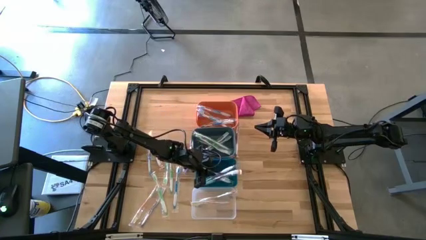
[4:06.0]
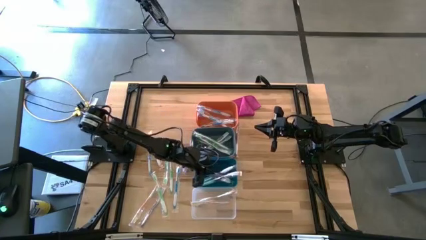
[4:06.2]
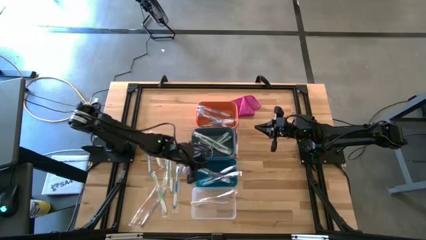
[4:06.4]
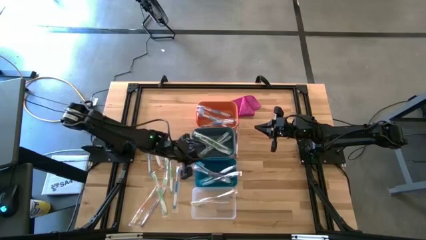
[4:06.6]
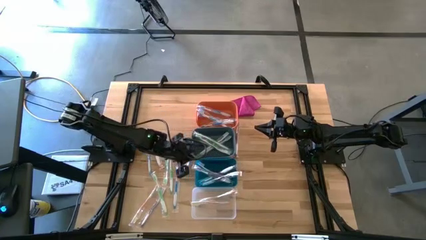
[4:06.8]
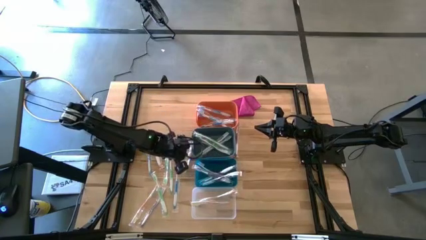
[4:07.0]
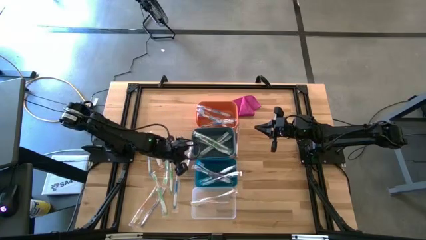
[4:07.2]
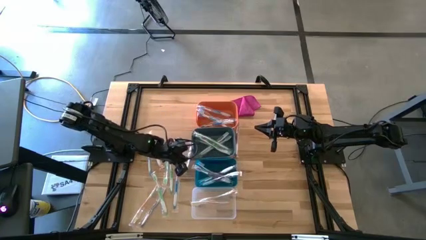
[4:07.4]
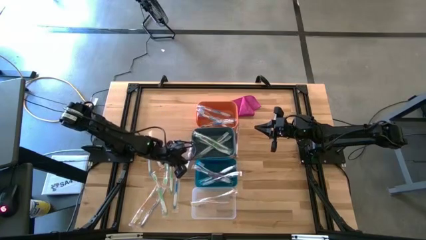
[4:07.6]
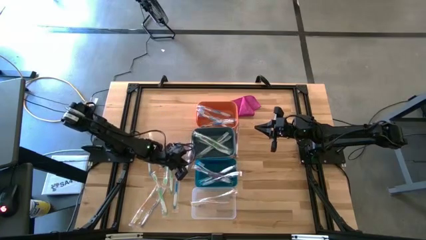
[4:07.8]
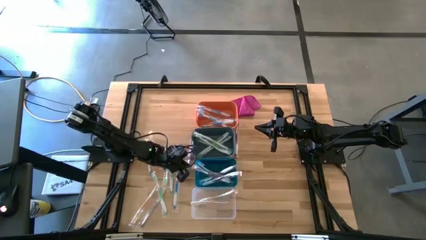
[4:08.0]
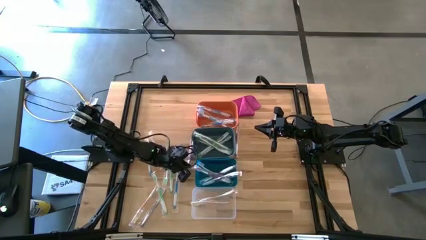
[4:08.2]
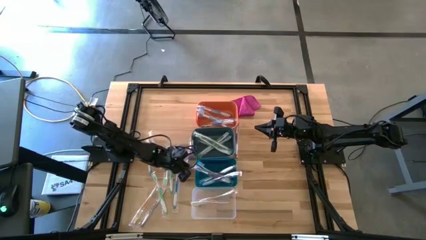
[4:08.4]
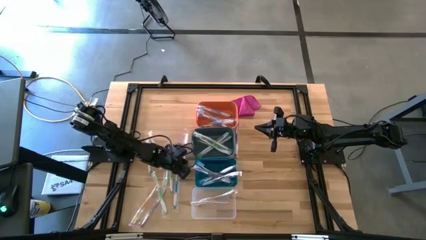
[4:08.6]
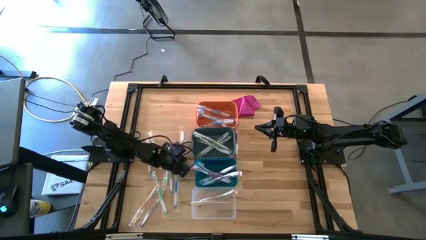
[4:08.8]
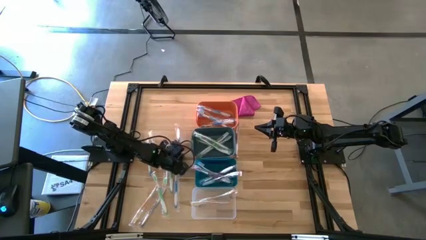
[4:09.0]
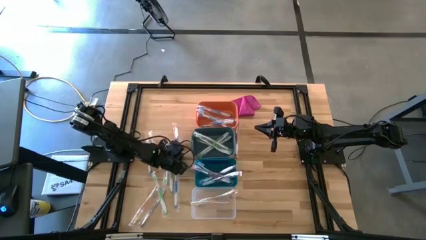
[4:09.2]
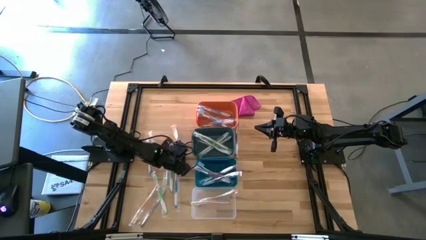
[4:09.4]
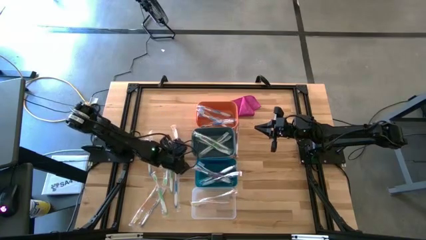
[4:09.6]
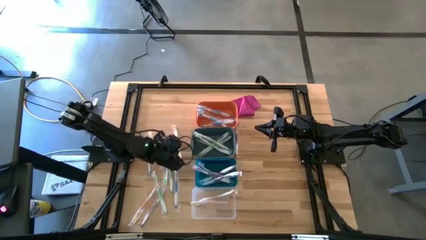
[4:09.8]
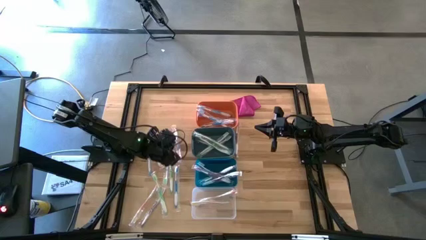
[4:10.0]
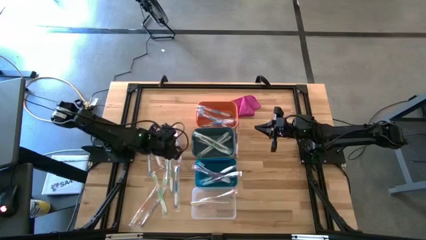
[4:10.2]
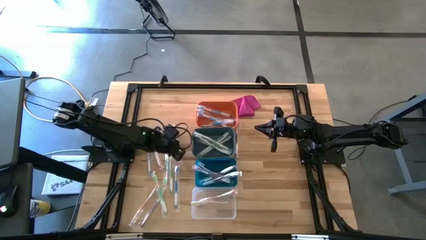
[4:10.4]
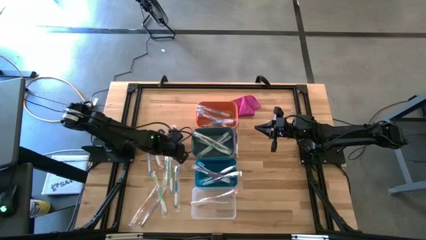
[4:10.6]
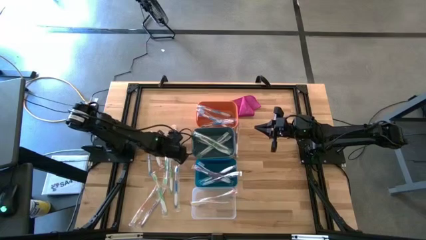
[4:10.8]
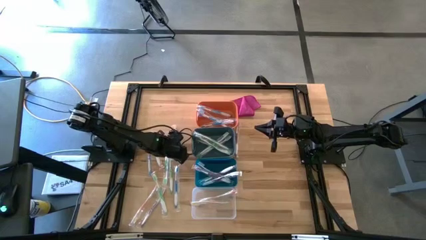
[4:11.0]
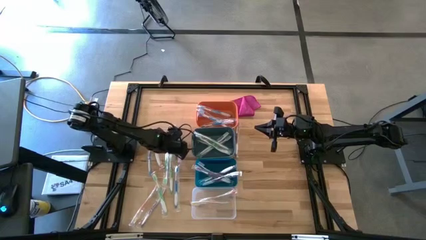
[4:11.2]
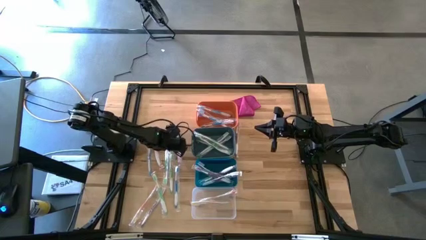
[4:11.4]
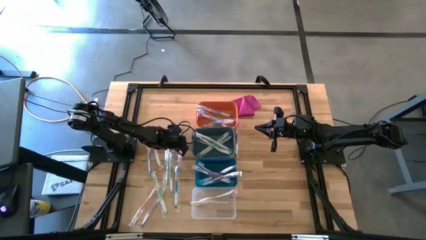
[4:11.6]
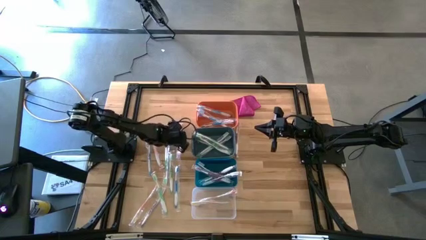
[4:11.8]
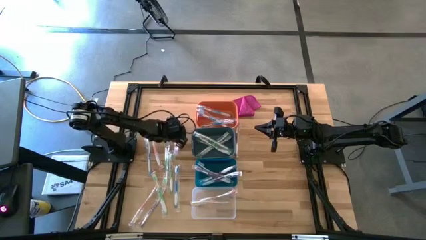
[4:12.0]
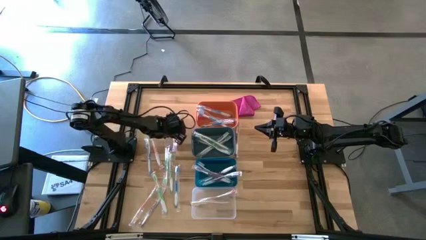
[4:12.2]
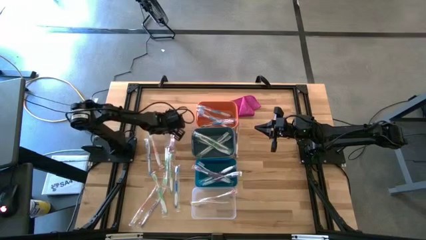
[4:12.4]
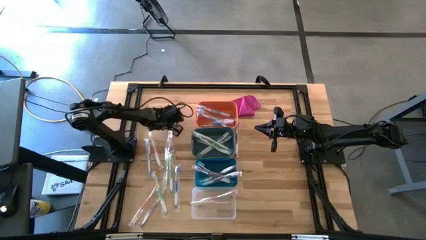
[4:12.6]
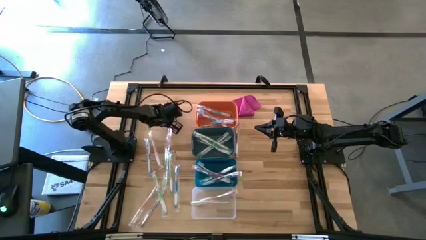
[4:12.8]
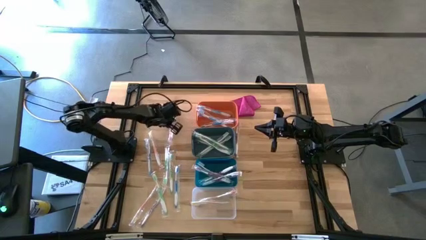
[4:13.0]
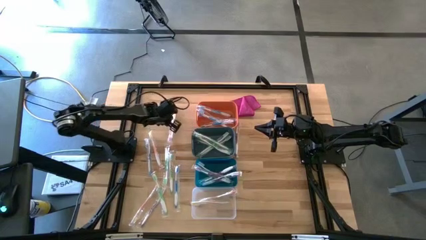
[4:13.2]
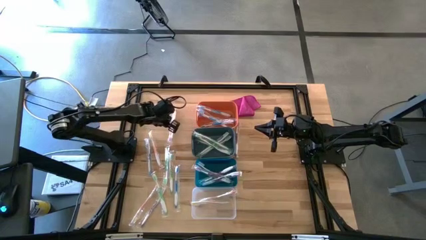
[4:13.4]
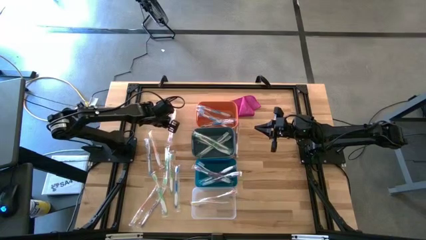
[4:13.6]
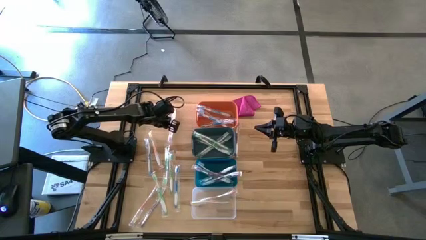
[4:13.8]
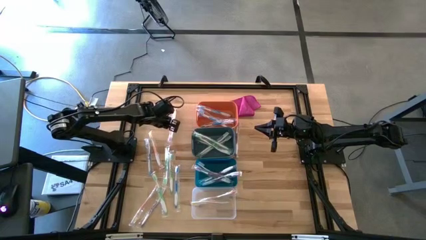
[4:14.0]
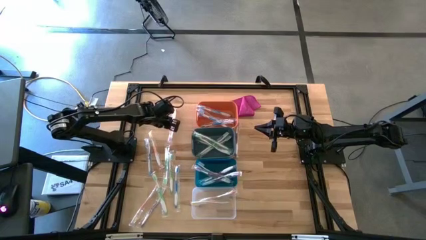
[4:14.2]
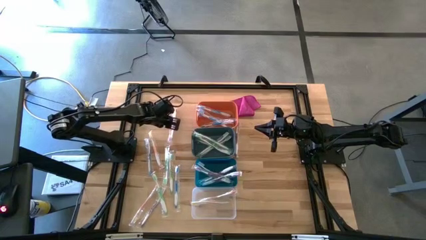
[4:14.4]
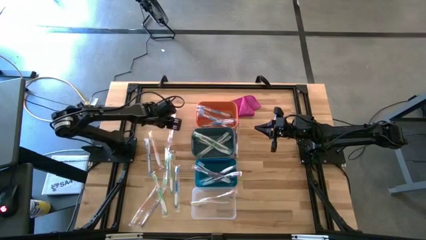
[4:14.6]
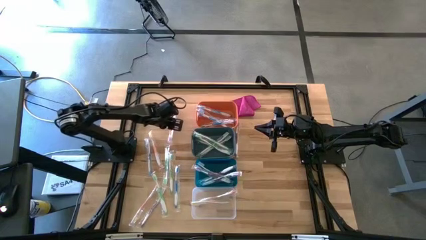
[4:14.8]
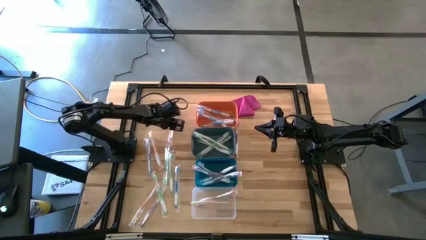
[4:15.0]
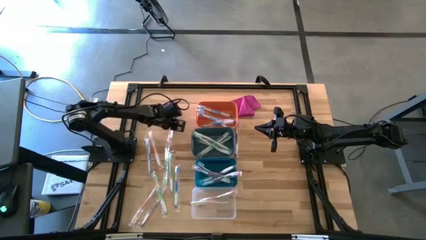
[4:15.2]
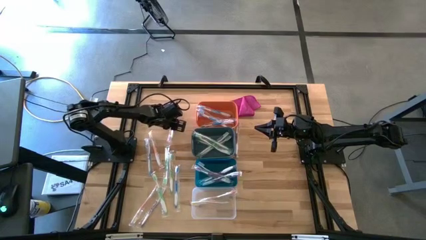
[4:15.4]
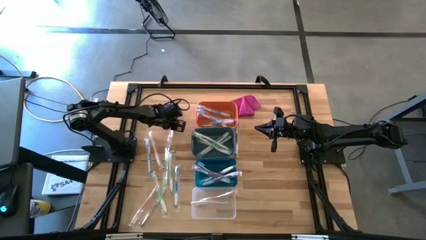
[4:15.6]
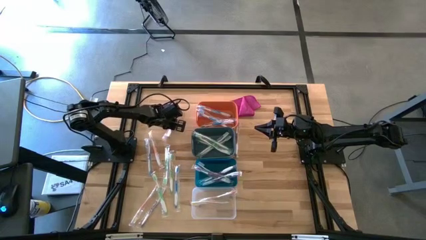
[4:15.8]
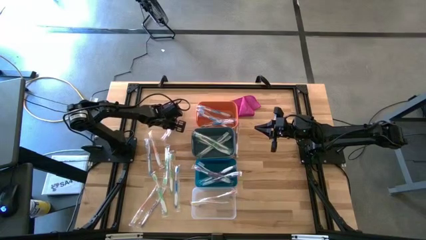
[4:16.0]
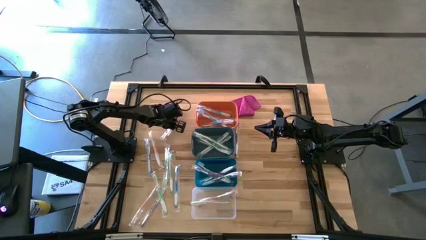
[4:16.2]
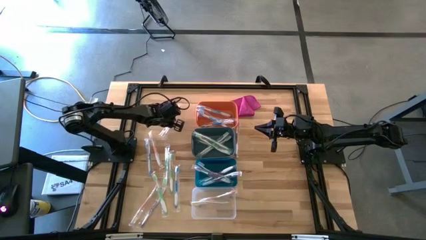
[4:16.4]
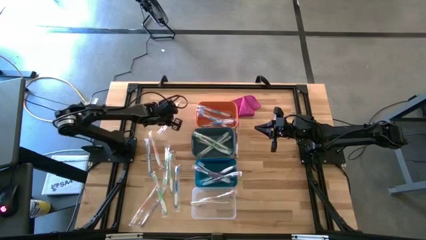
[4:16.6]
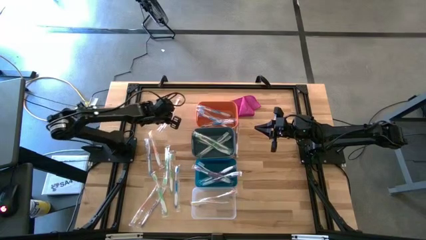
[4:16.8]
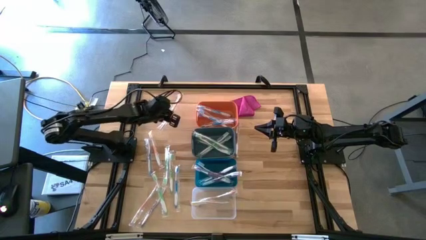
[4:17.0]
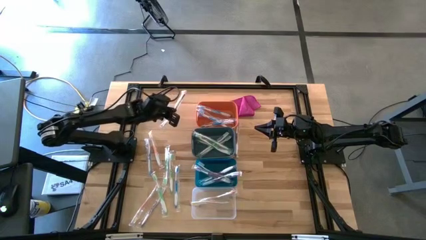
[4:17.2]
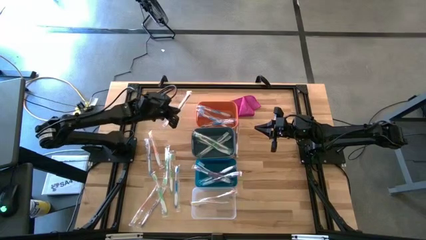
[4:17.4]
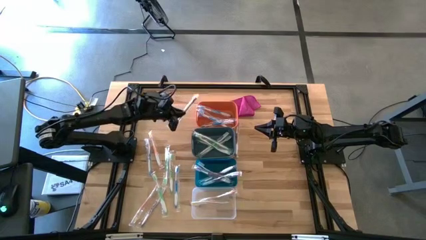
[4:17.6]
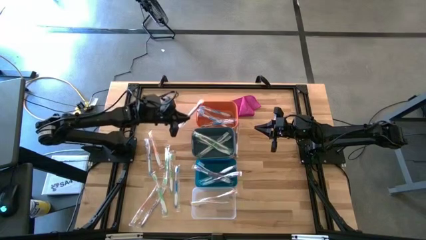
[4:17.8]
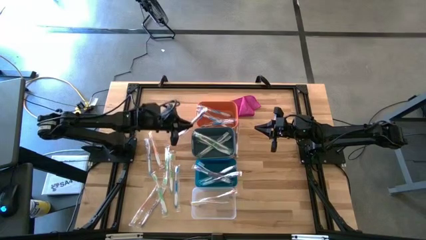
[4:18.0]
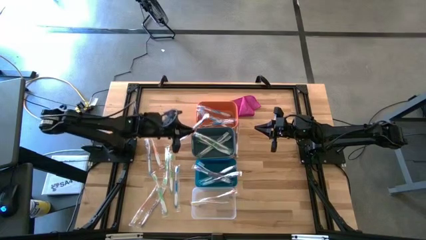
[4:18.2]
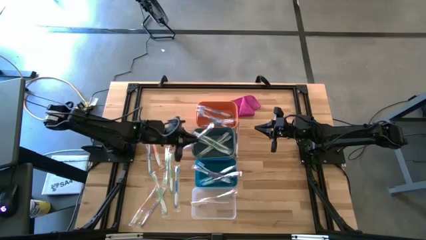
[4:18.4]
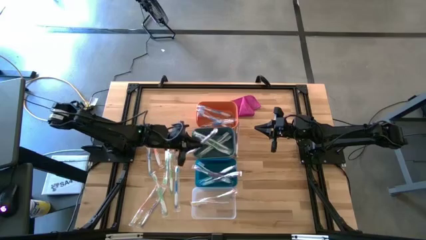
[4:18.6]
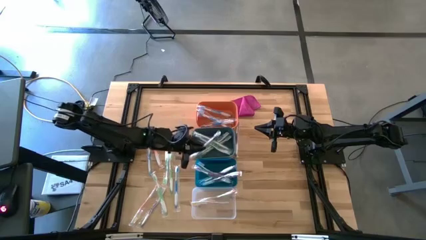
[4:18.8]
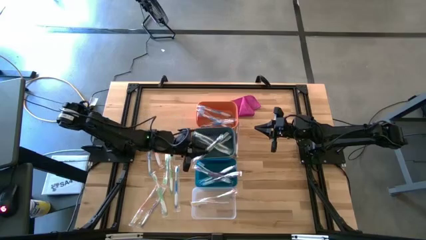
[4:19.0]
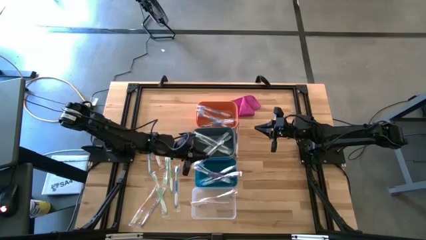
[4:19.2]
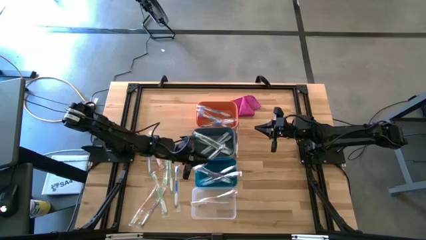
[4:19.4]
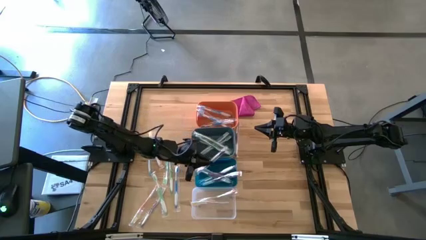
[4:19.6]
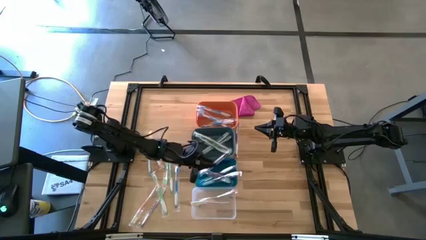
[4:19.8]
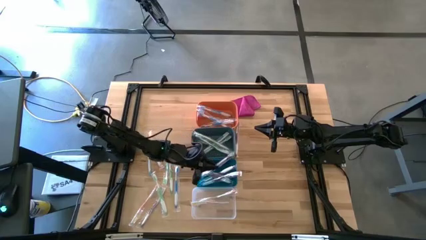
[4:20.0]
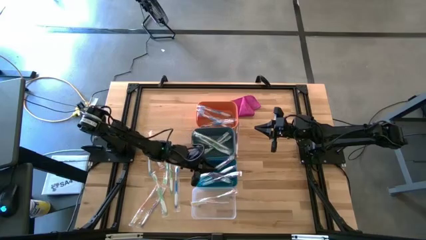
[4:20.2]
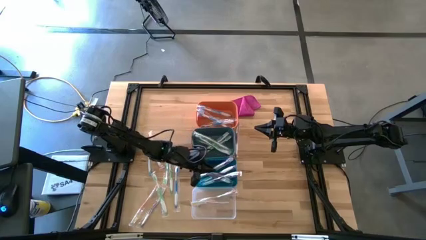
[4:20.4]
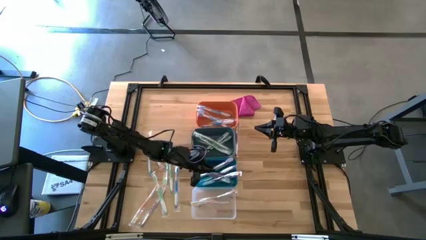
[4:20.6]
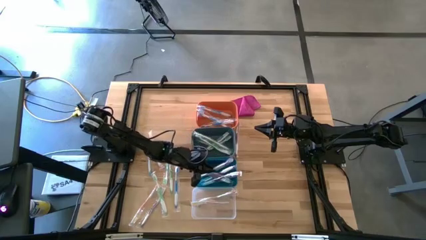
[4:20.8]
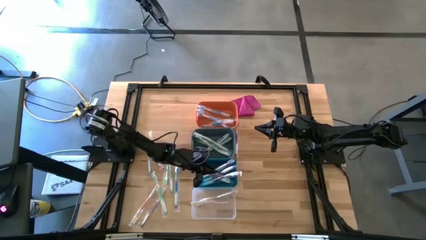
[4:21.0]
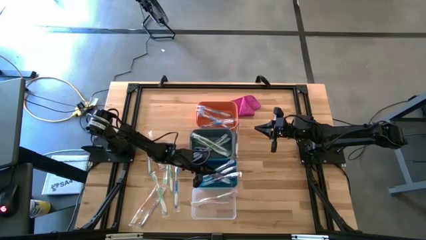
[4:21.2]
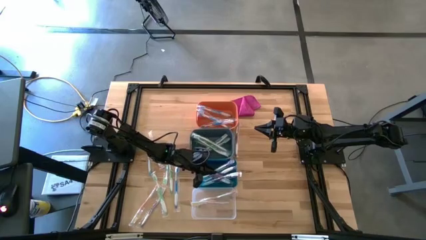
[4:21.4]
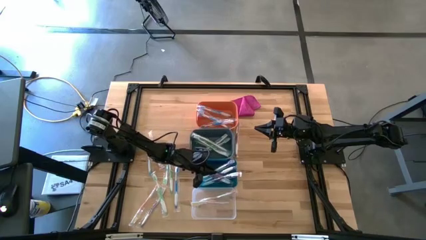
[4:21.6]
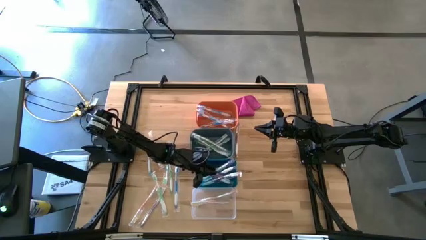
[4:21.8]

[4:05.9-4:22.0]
Task: Pick & Place Toothbrushes
Put the purple toothbrush into the blue bin

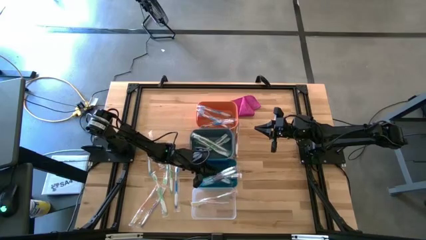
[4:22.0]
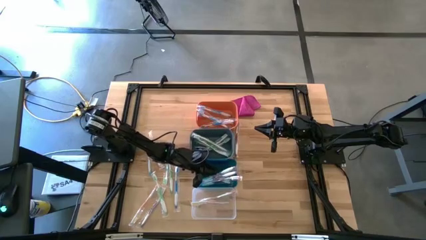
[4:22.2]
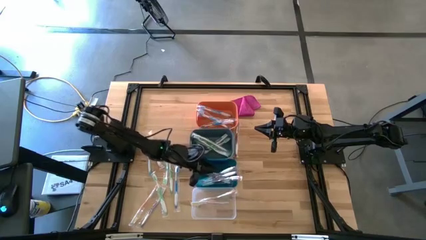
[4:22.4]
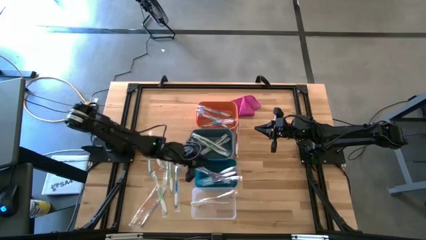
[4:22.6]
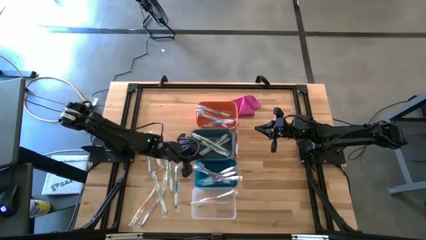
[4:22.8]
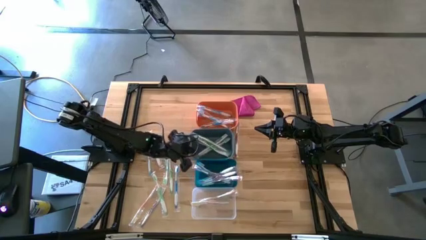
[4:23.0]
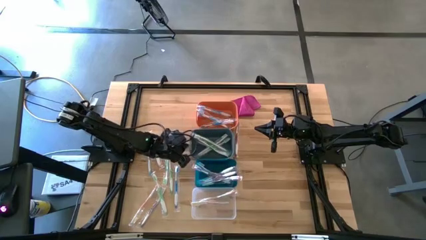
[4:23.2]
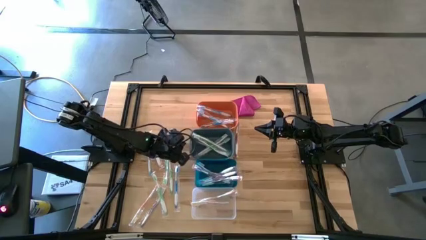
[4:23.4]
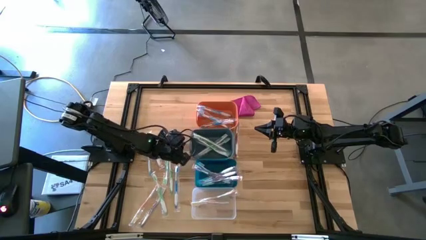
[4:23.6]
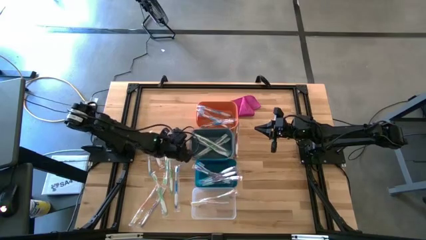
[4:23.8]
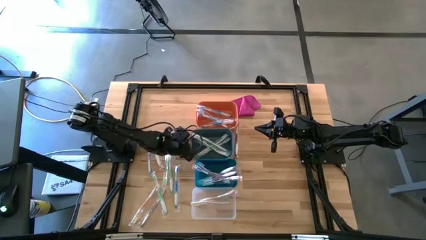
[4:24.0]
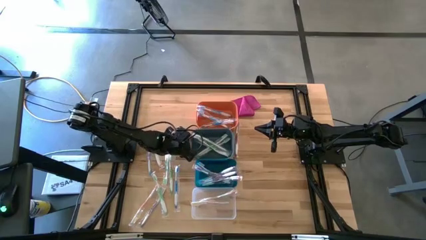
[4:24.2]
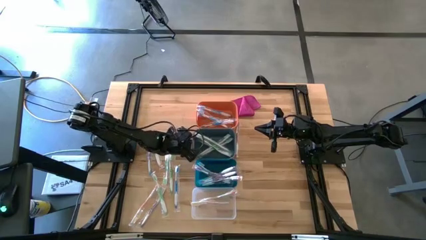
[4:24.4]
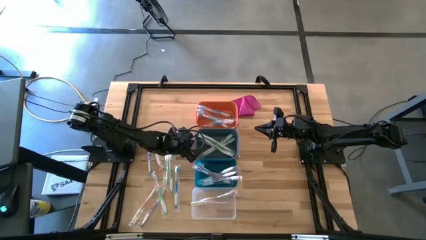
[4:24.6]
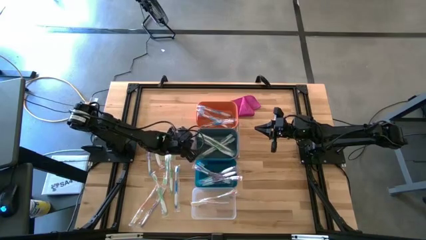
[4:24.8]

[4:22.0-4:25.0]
Adjust the green bin
